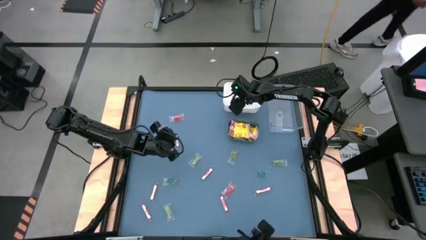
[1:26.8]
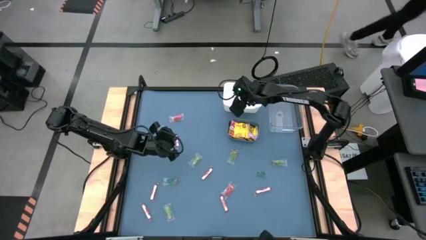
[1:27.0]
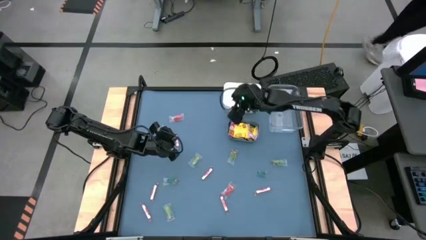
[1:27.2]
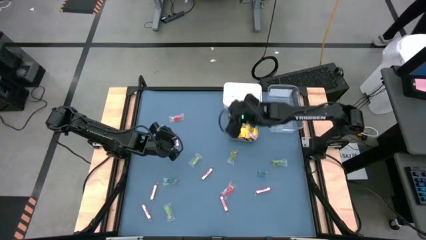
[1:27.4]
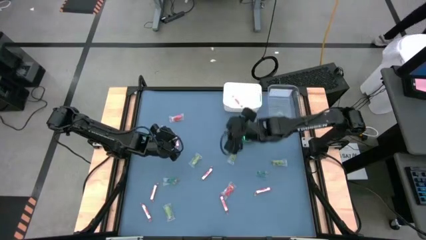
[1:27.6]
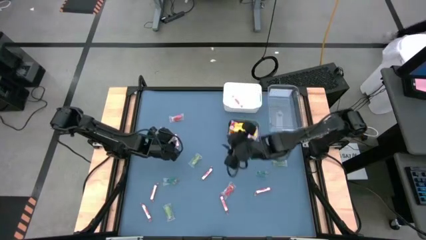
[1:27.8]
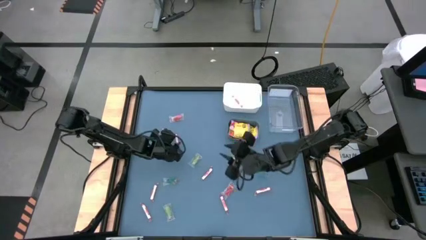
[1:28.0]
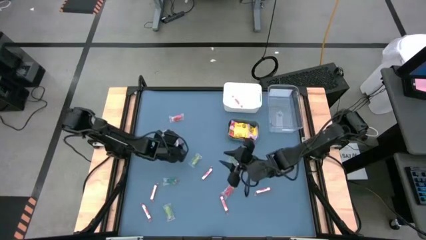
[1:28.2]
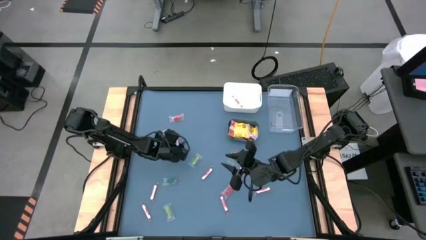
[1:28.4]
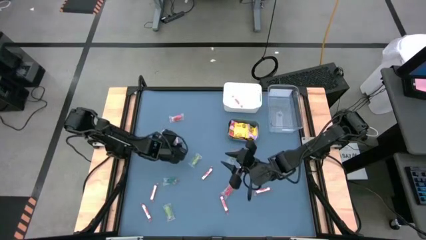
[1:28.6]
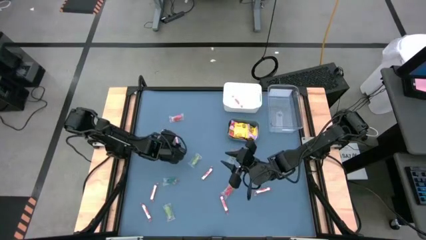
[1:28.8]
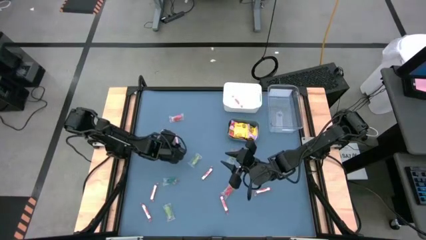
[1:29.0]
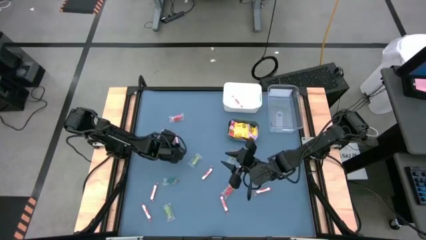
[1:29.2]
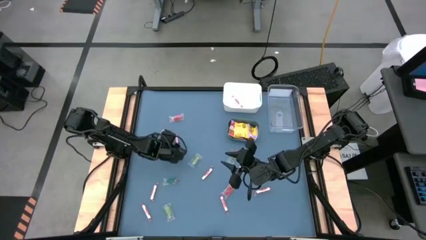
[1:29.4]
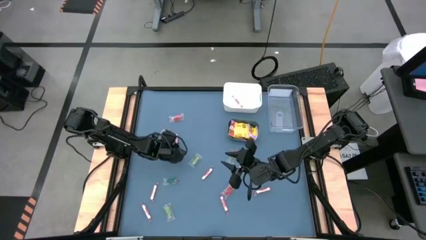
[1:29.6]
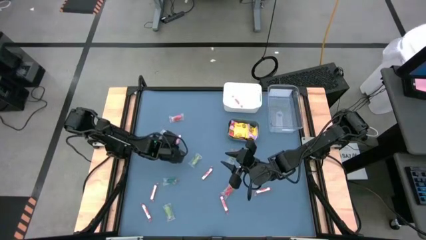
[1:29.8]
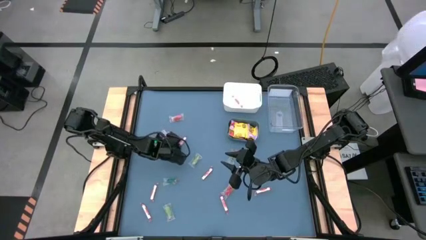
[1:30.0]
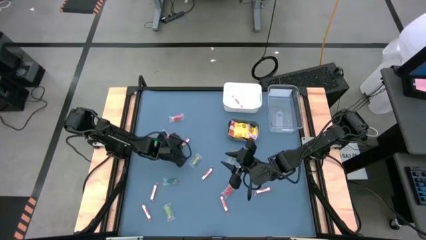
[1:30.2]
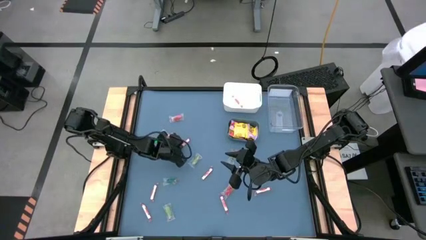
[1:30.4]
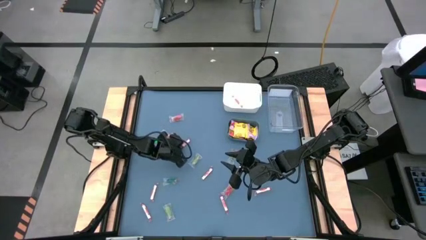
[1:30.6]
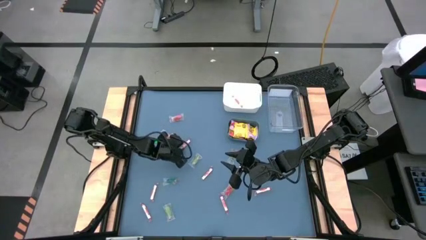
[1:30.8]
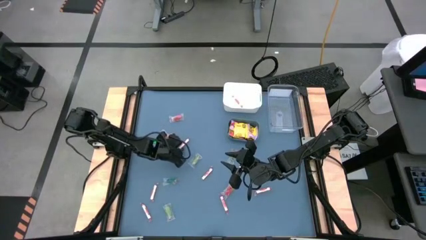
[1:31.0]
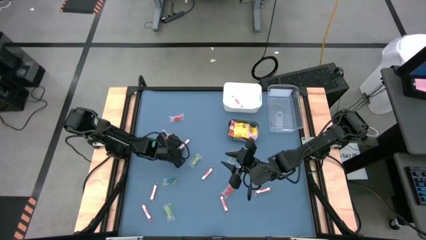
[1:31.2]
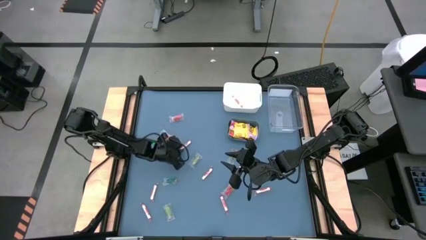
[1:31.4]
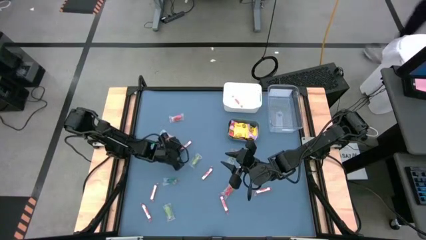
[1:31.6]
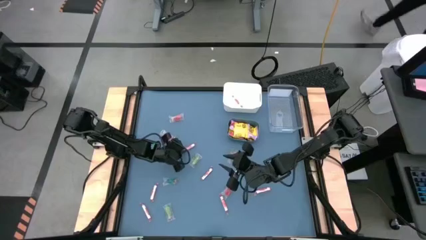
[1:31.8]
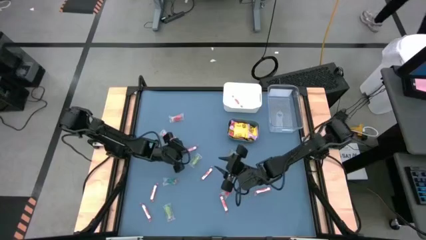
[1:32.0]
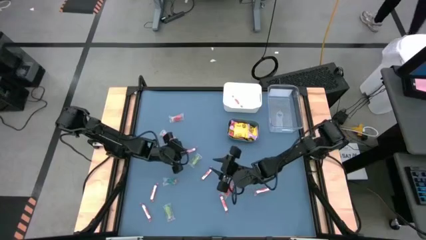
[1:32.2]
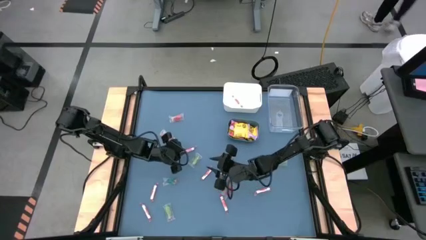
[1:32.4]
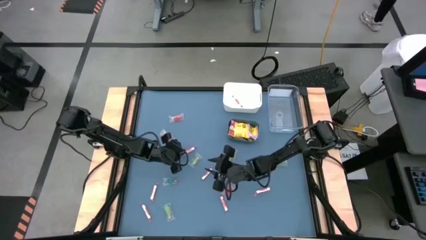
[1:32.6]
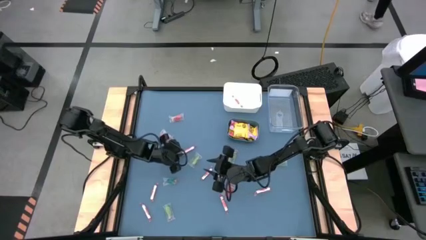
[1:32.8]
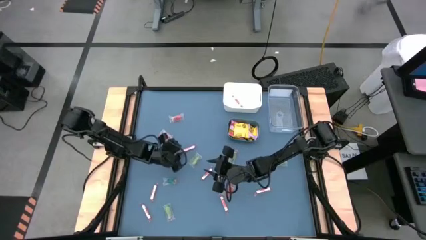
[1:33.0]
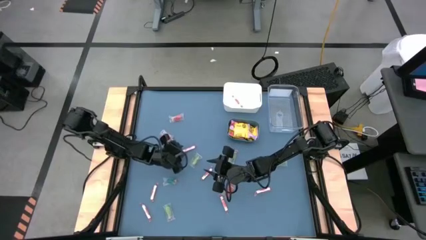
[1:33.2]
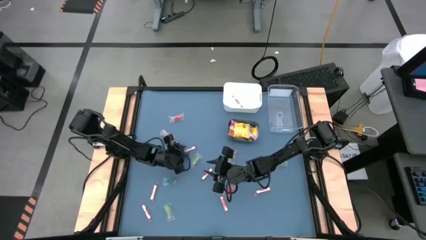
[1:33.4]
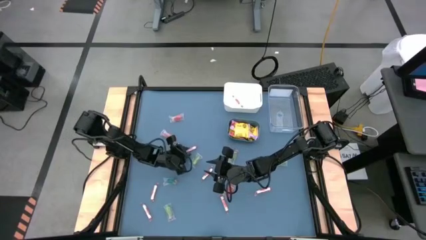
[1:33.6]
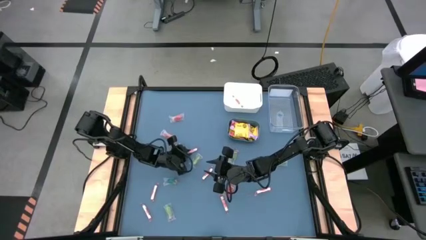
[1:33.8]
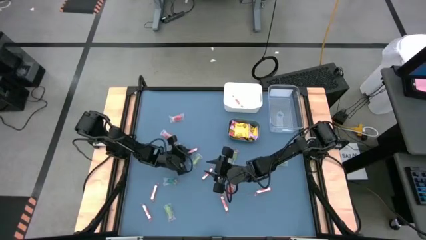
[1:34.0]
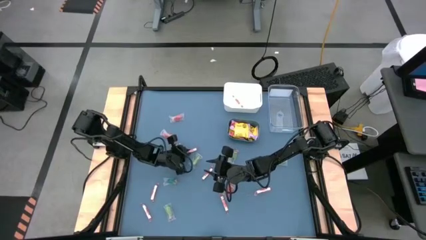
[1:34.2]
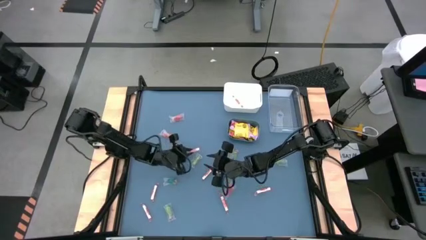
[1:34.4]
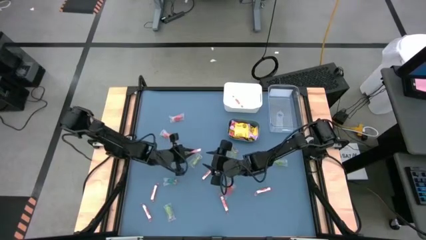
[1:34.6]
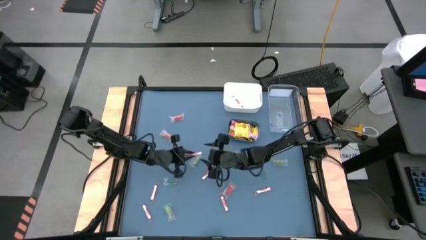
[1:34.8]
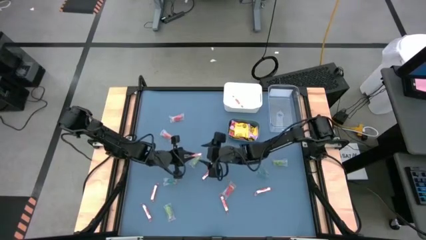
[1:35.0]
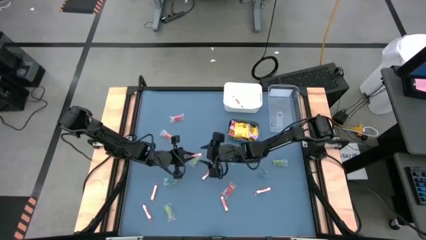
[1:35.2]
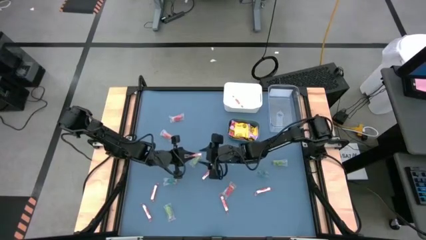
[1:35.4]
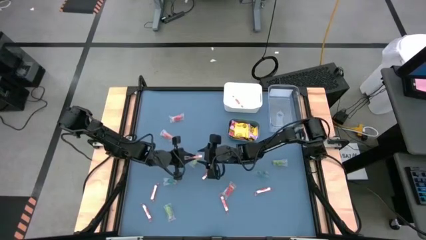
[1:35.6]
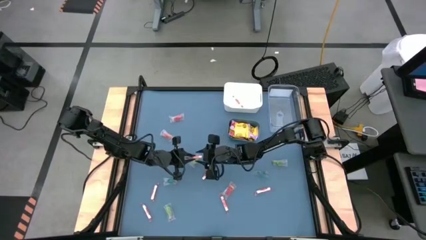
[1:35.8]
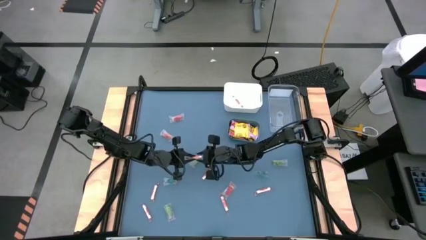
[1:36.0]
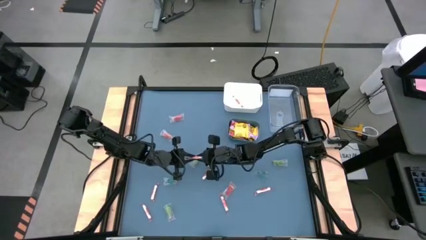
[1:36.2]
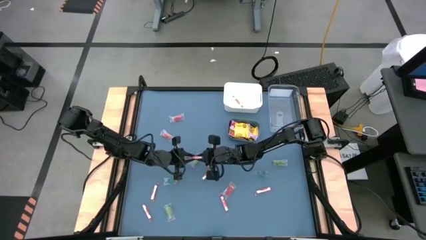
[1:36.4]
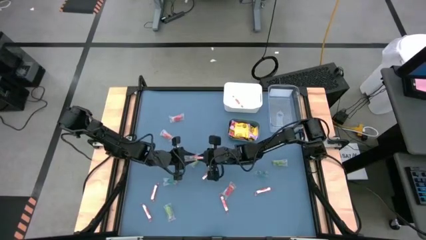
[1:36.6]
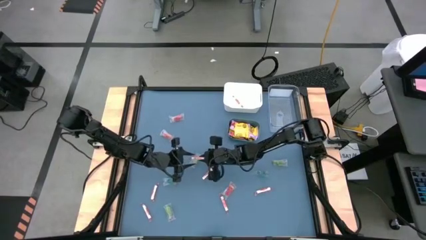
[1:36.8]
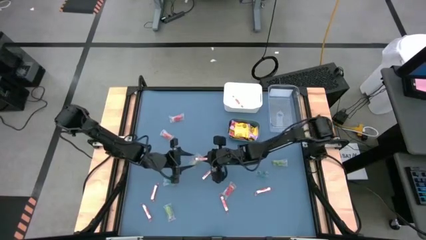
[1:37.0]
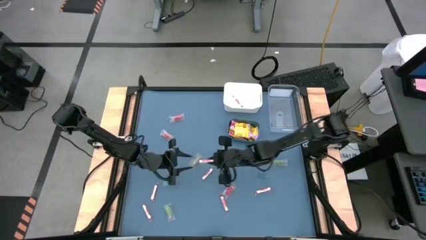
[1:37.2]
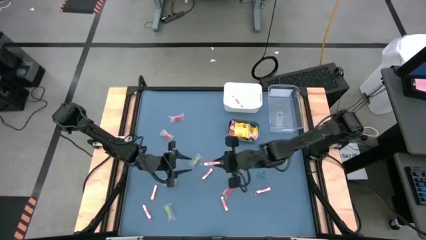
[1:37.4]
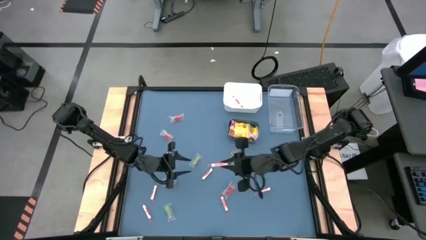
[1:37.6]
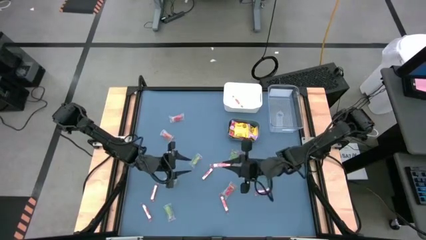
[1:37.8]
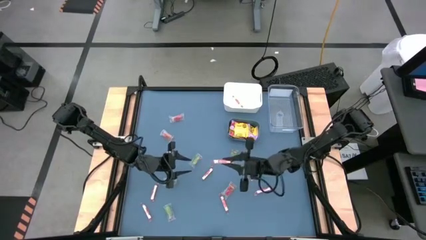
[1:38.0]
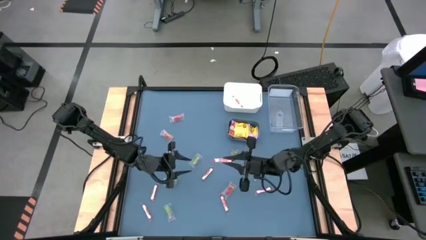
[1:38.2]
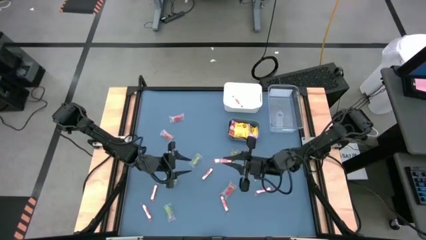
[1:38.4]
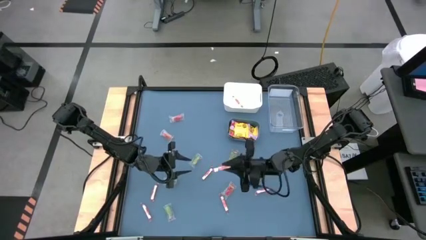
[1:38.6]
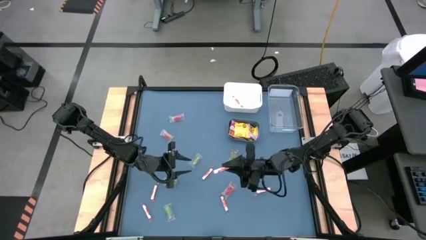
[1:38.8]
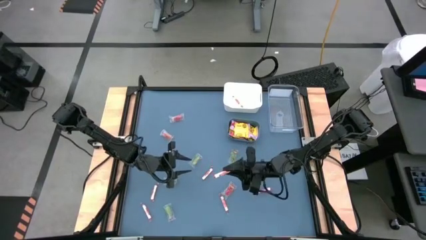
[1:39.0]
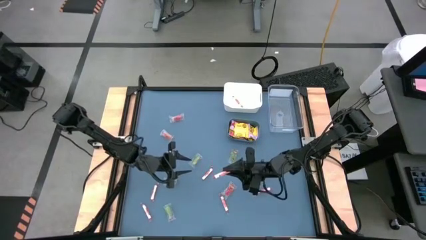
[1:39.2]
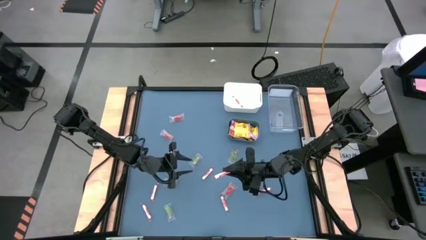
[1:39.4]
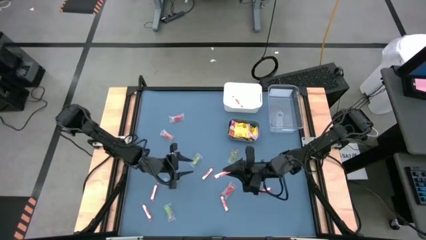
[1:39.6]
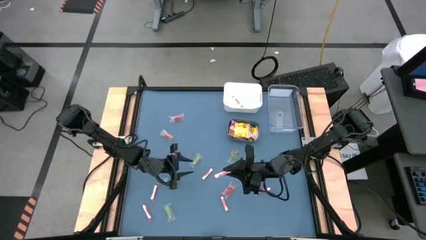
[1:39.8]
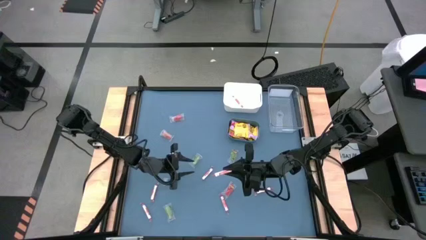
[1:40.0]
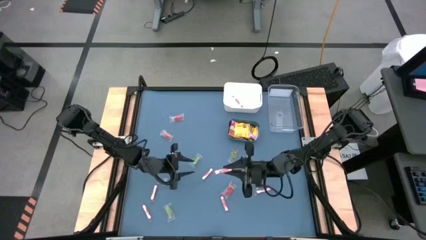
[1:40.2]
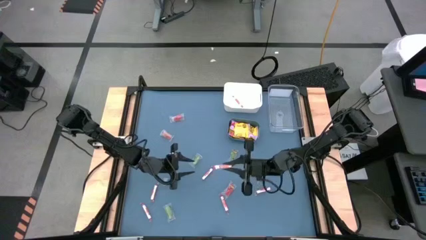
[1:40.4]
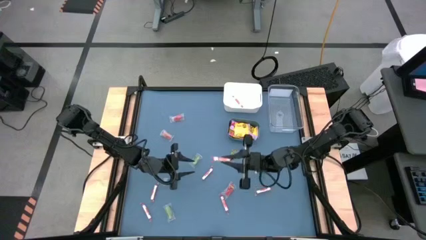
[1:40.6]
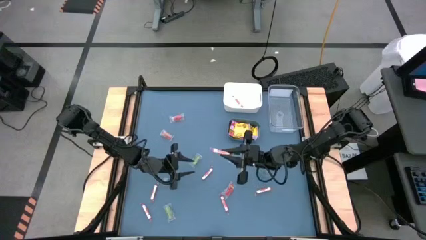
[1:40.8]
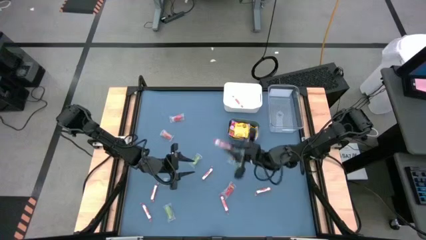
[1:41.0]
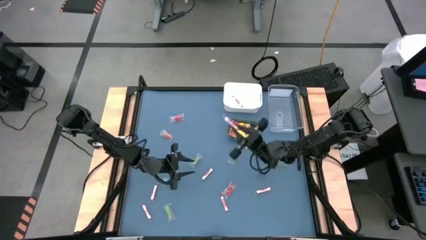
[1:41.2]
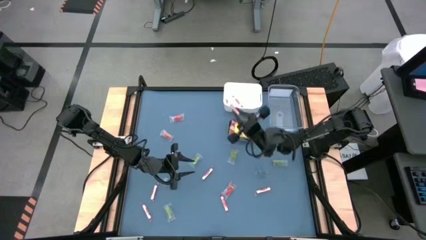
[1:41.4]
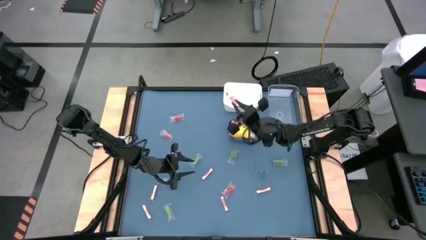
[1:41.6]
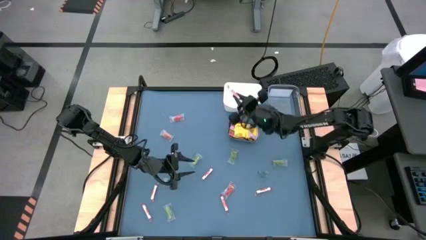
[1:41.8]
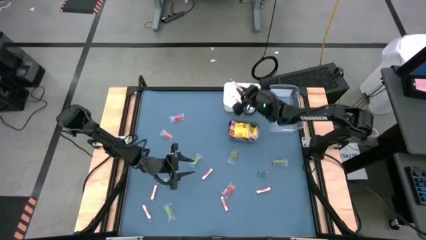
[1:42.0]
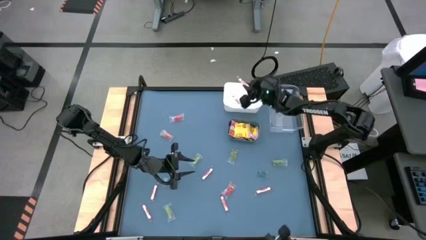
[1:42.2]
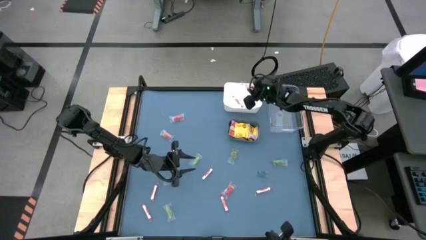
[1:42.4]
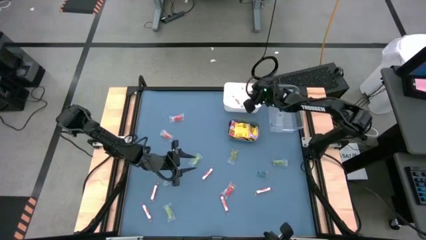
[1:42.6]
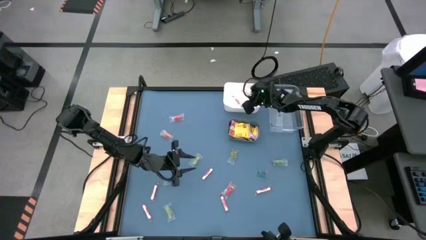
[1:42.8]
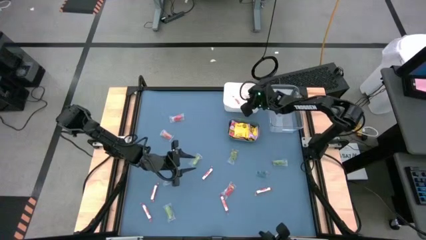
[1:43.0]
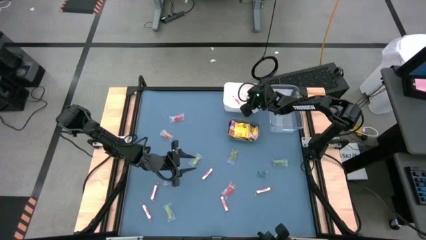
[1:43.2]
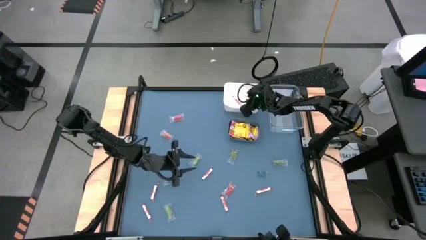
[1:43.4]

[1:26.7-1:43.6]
Task: Sort candy
Put the top left white candy into the white bin
